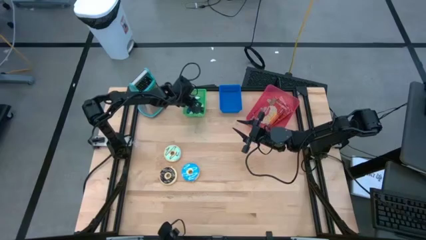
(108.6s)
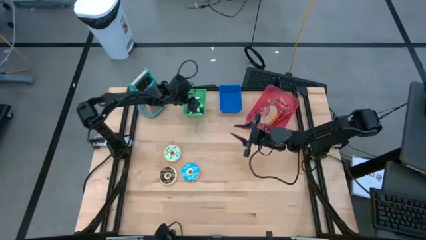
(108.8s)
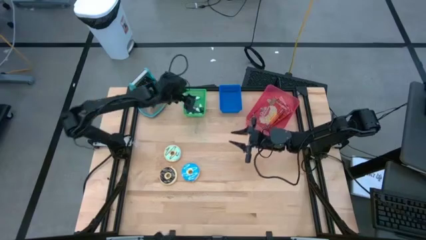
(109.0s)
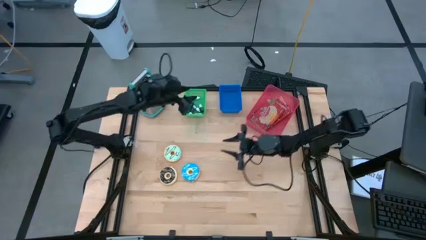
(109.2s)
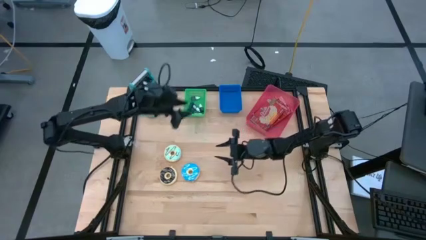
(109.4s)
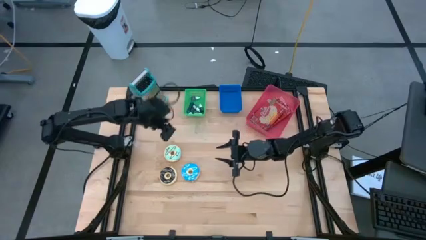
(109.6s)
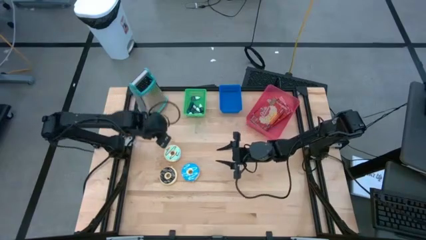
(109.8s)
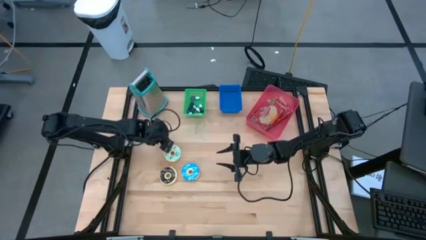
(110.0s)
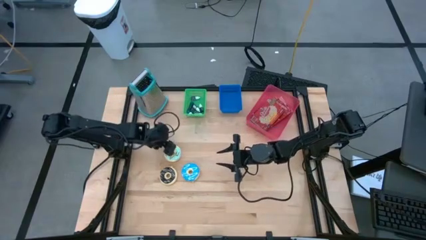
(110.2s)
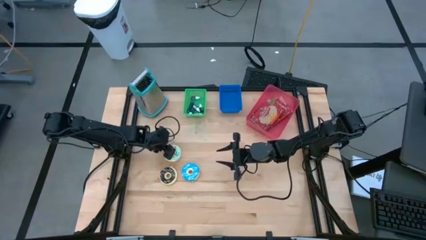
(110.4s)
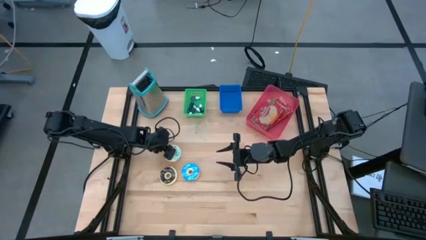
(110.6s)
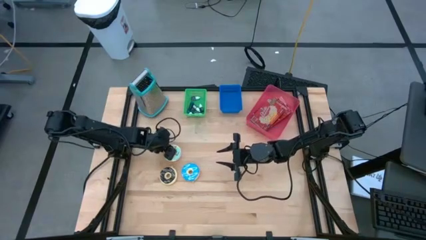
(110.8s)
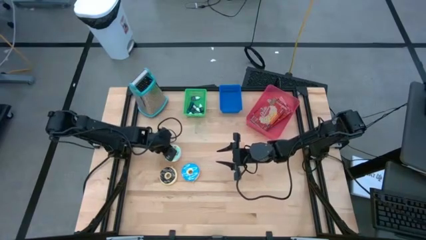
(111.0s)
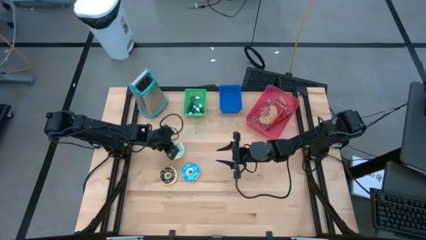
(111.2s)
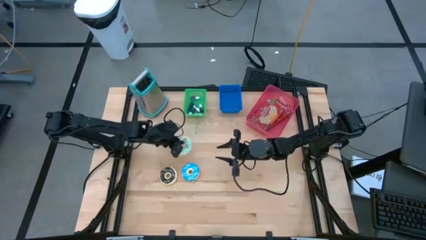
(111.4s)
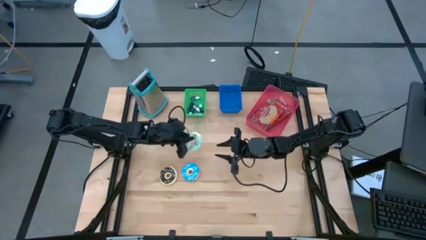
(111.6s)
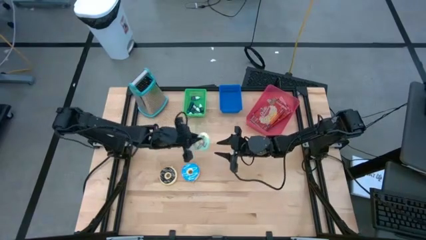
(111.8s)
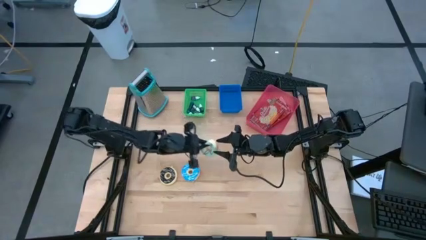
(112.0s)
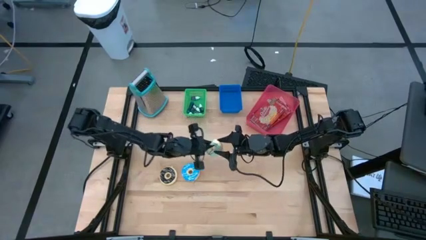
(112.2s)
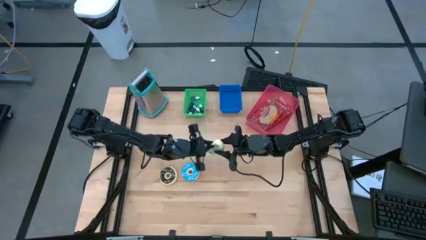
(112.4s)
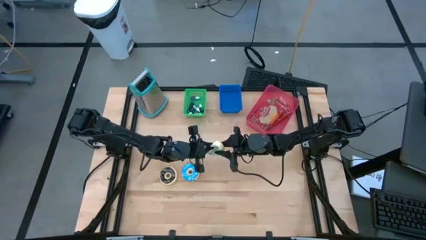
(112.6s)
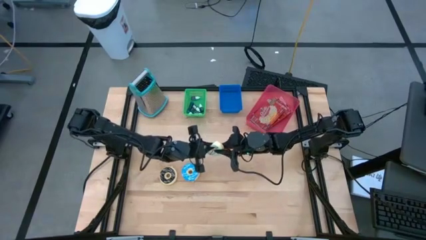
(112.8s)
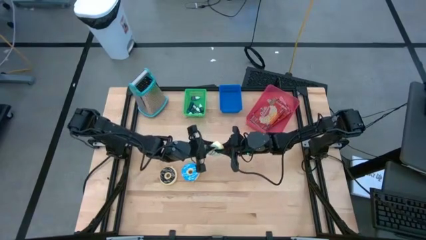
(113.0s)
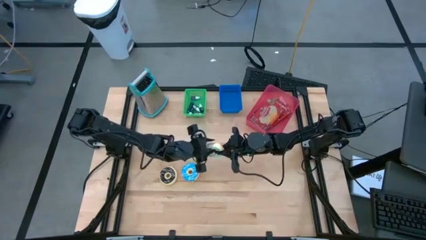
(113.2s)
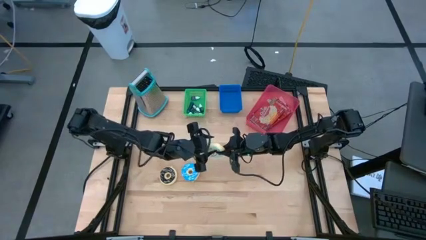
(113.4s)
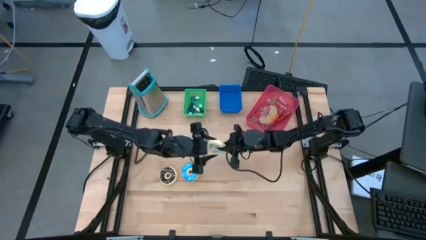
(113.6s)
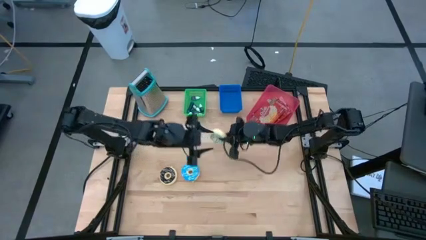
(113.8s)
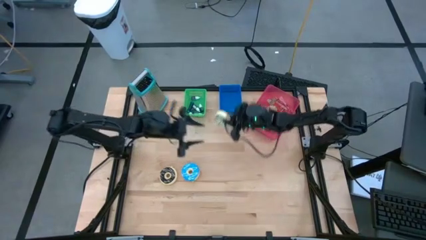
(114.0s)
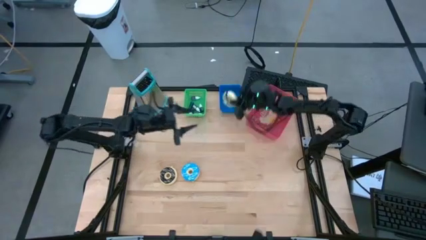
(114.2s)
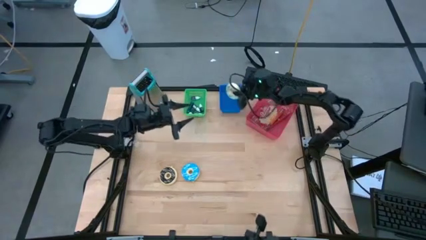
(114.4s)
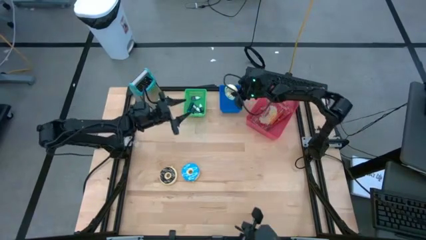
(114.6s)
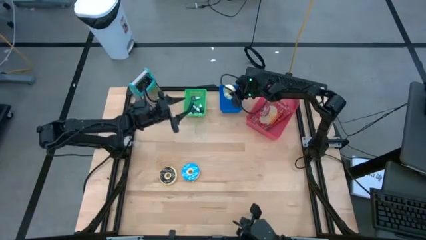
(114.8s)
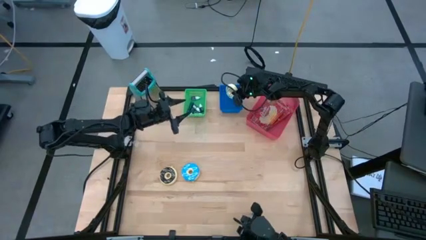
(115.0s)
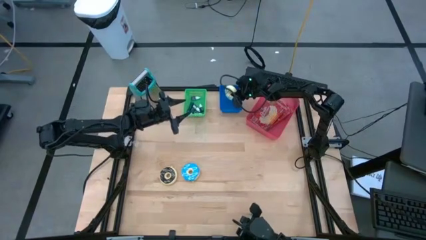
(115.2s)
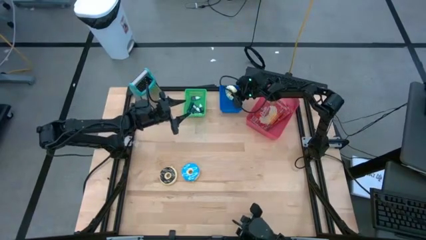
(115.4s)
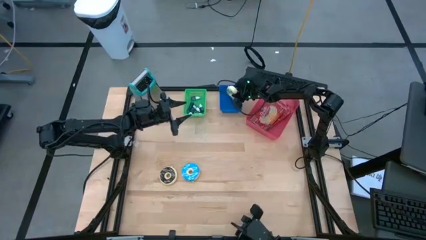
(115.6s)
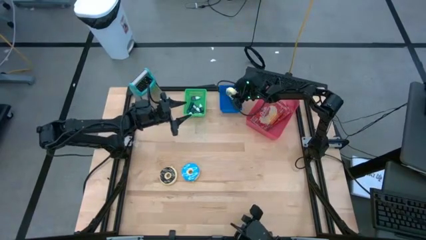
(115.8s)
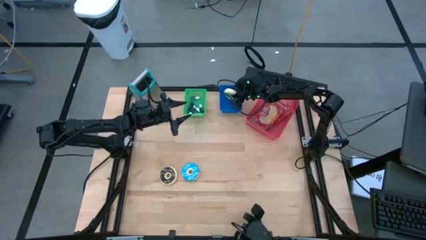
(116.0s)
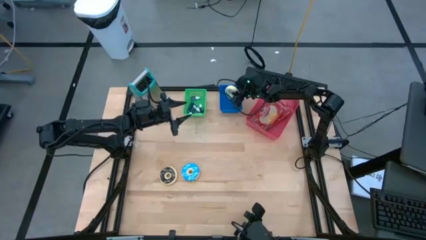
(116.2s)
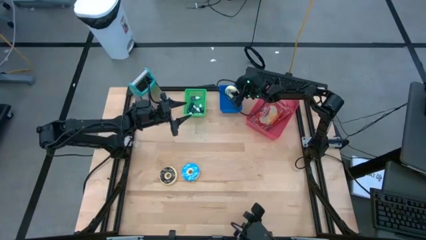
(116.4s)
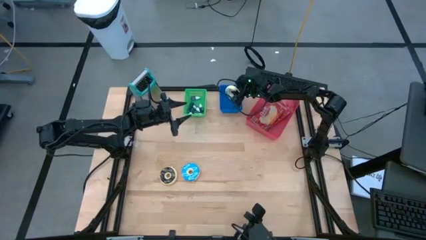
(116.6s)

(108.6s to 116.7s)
Put the light blue donut into the blue bin

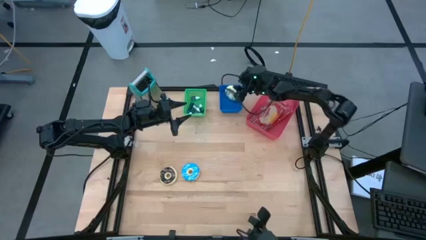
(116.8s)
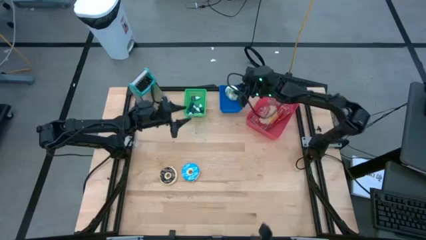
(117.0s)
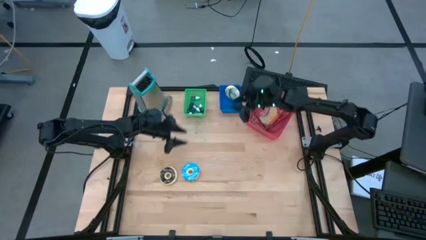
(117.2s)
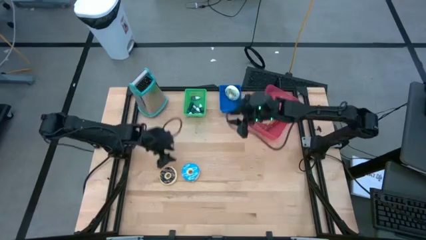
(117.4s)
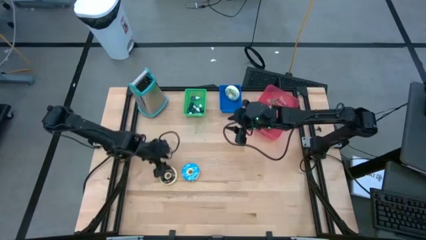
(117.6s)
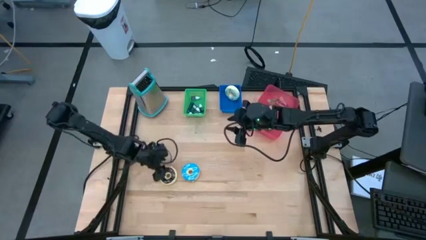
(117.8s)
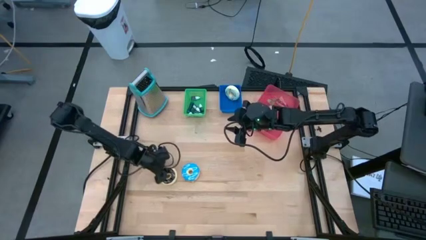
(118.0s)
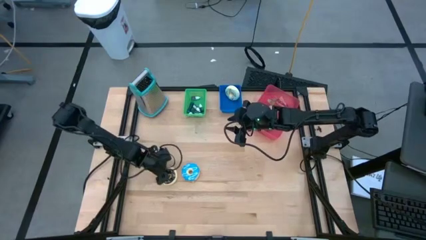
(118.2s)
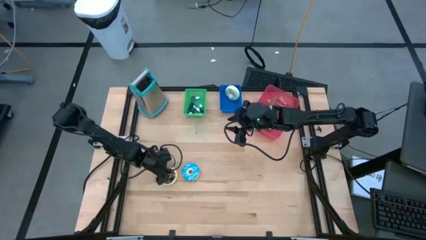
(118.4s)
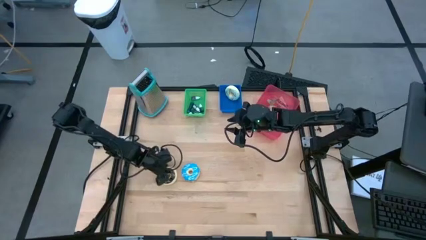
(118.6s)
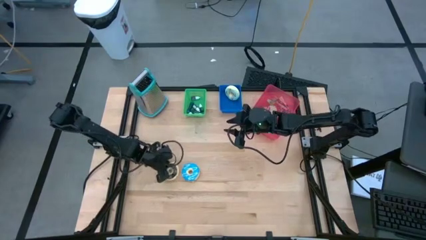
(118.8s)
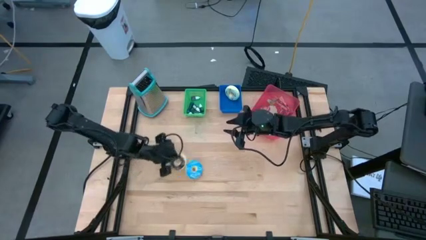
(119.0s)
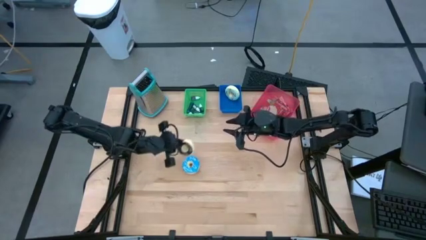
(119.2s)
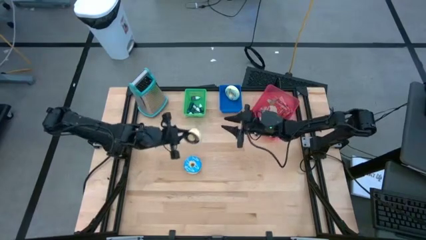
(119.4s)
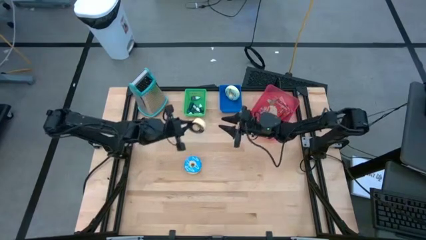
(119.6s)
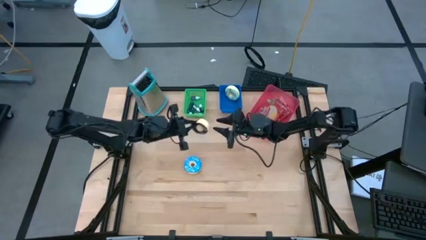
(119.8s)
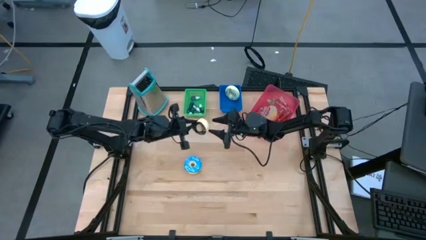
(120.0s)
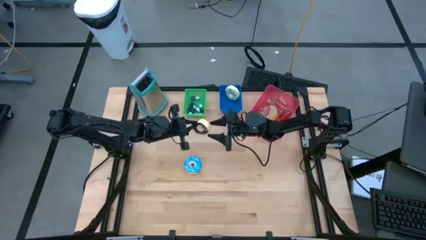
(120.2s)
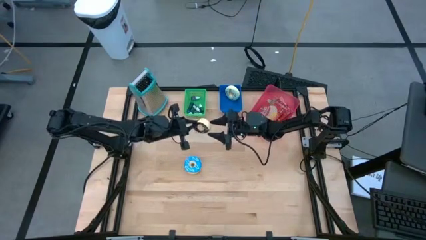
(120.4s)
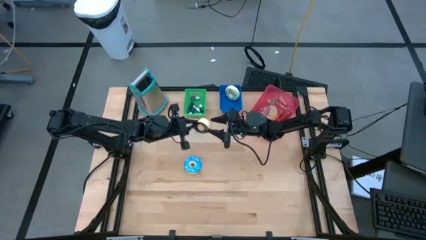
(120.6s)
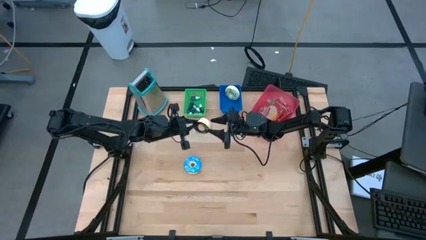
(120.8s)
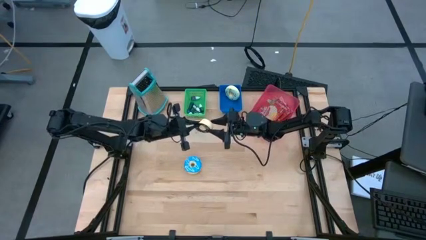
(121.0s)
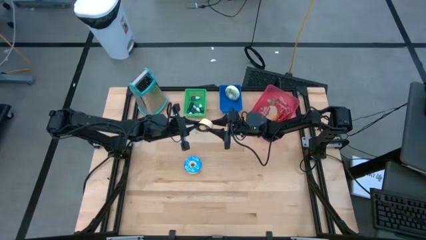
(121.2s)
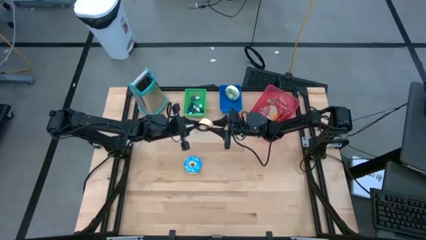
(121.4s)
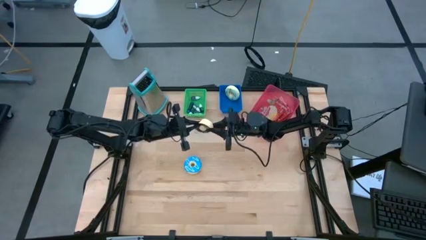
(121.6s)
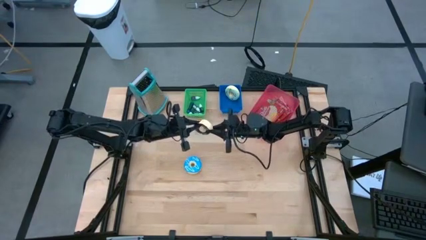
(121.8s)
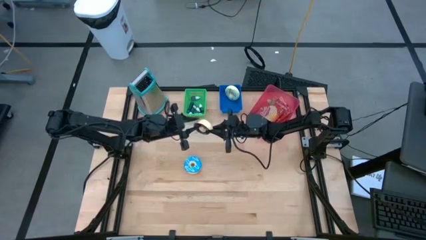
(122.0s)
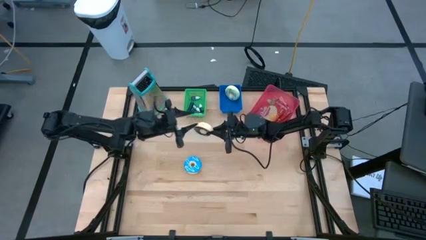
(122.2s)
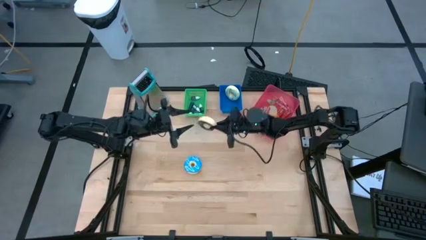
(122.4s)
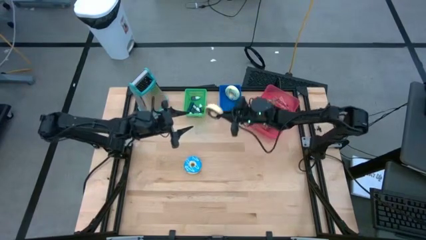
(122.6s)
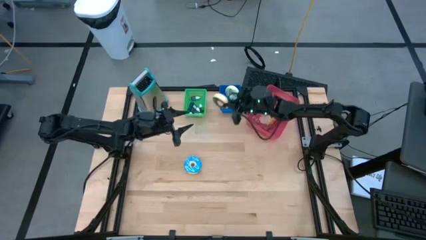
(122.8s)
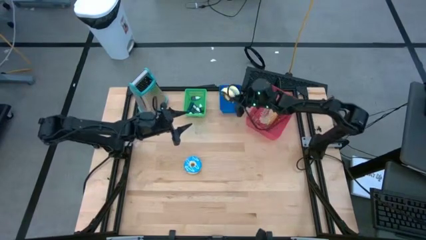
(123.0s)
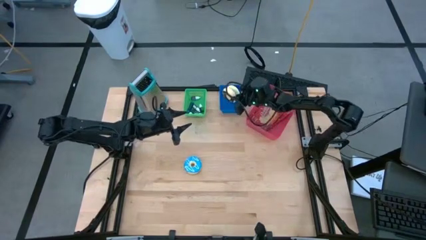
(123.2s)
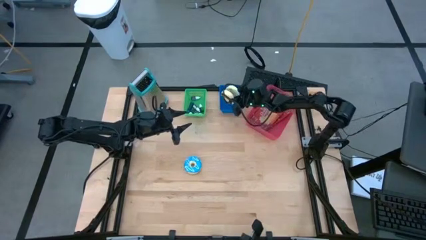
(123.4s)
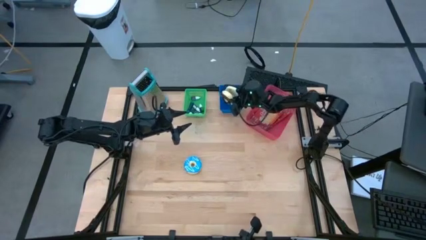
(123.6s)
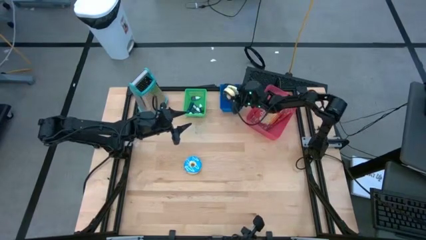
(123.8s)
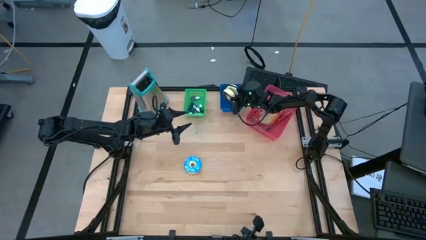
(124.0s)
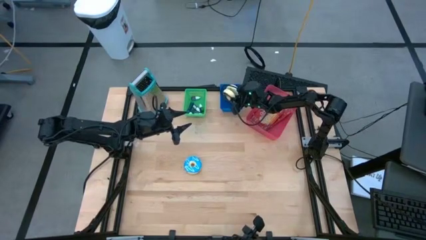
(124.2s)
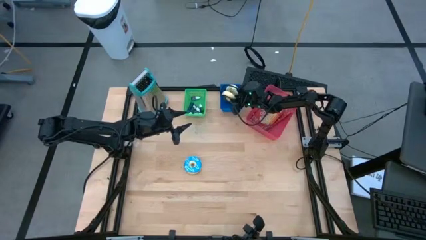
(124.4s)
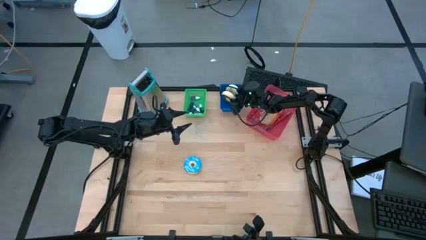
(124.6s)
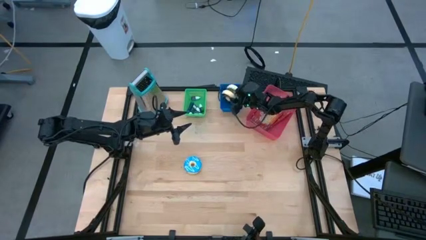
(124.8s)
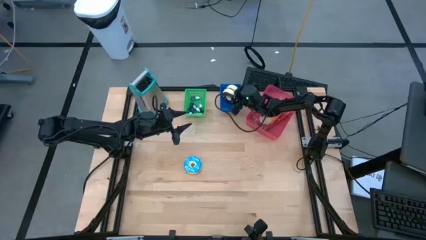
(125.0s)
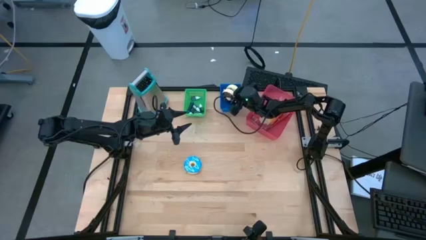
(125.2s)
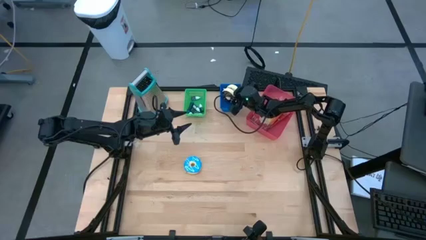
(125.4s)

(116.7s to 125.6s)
Put the black donut into the blue bin
